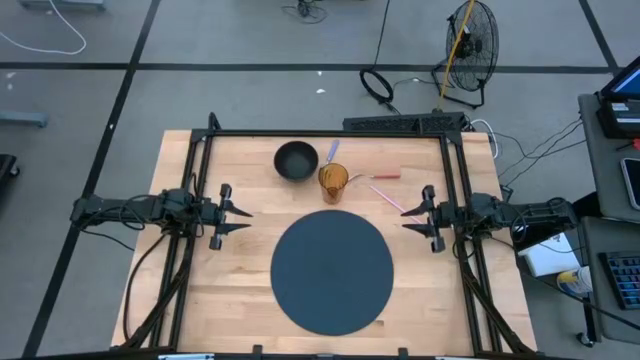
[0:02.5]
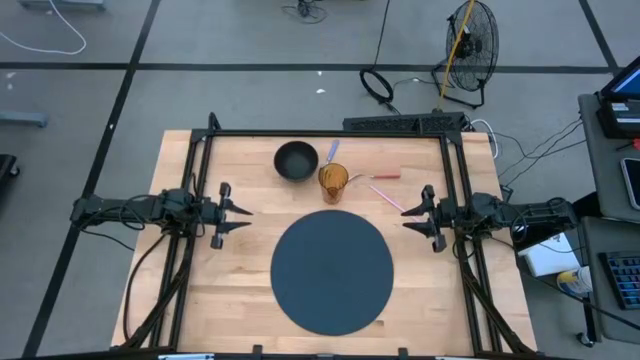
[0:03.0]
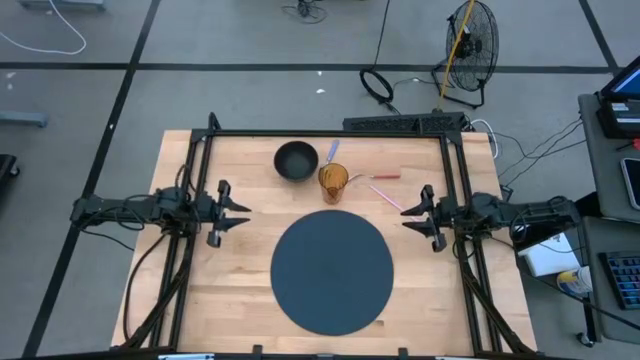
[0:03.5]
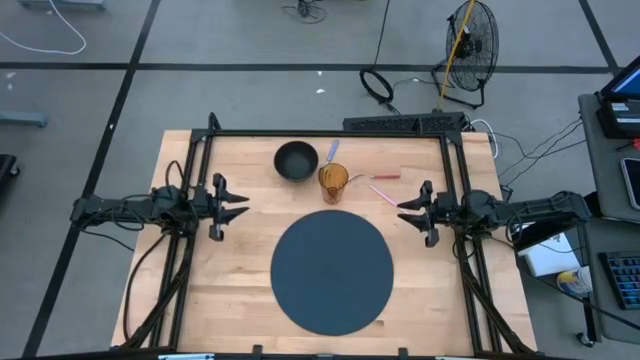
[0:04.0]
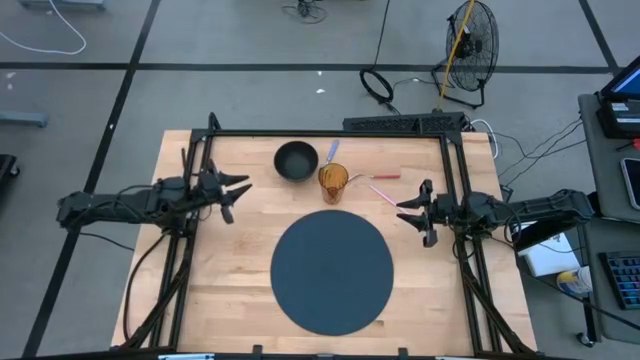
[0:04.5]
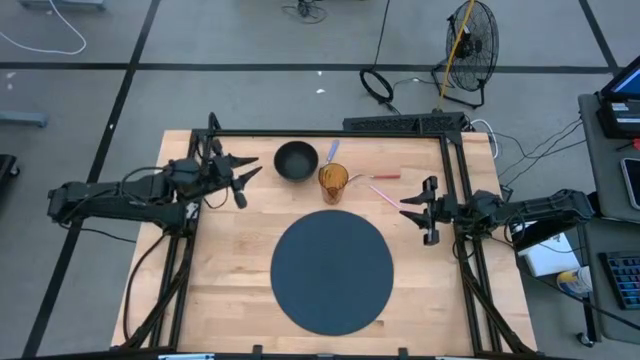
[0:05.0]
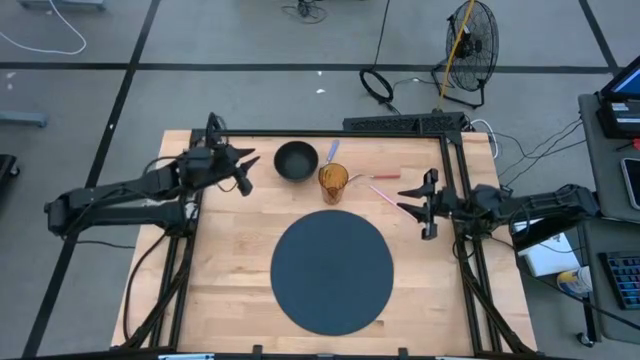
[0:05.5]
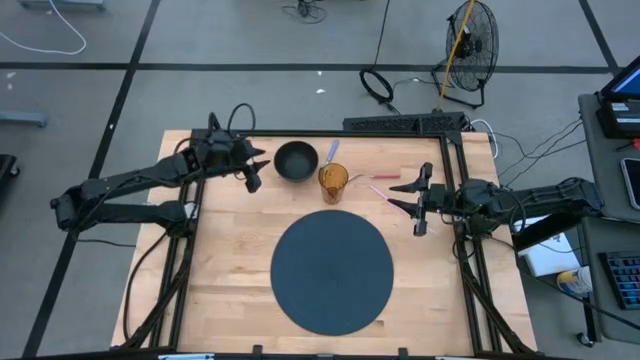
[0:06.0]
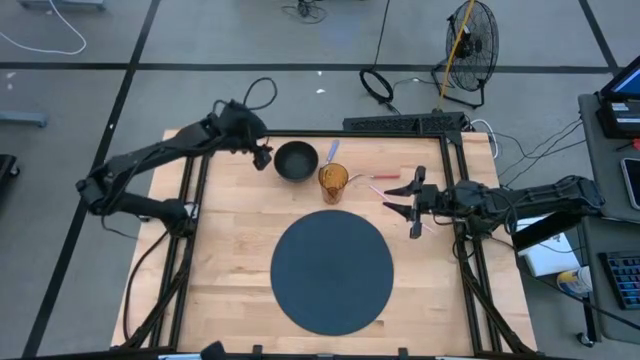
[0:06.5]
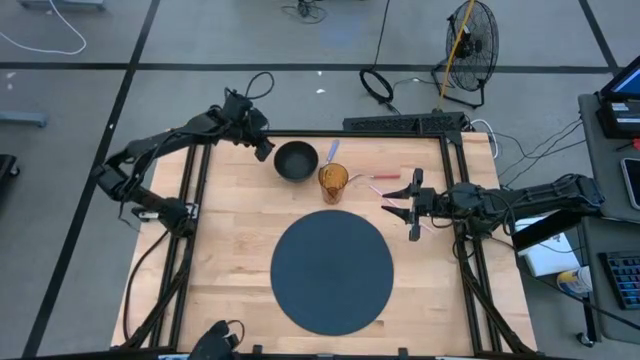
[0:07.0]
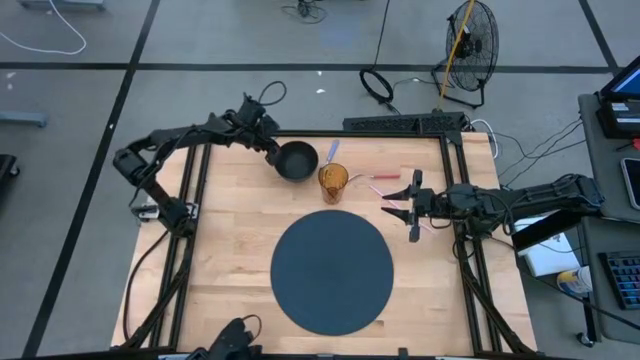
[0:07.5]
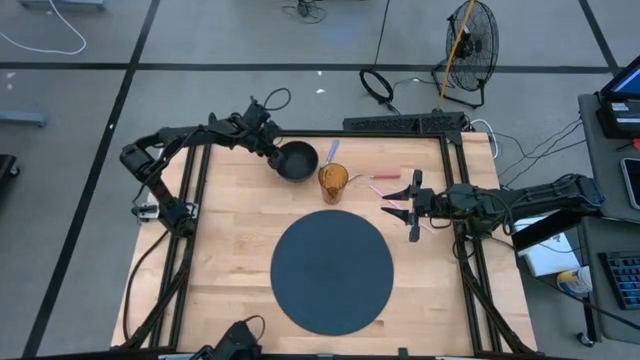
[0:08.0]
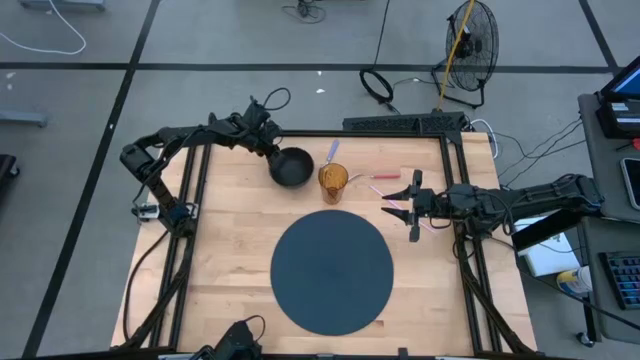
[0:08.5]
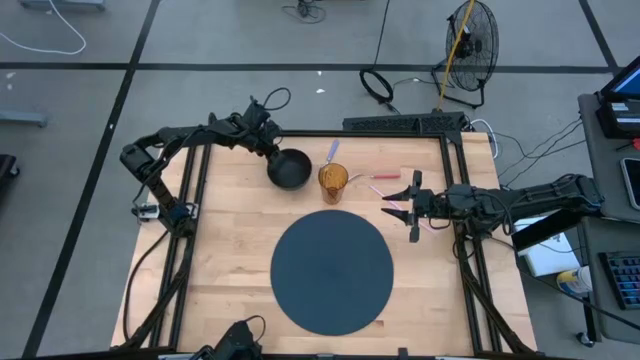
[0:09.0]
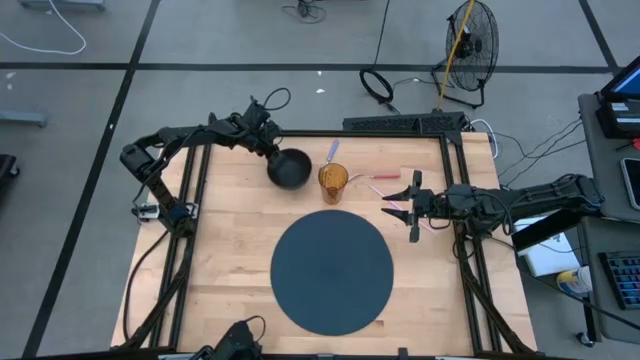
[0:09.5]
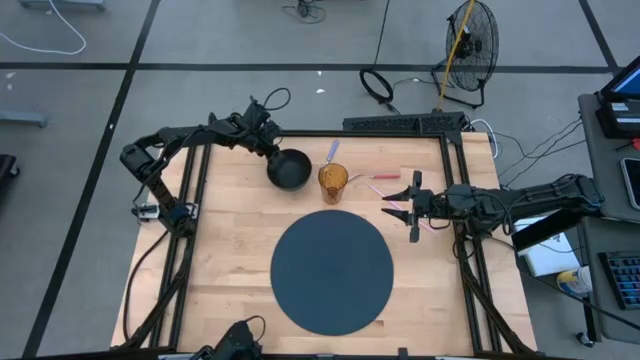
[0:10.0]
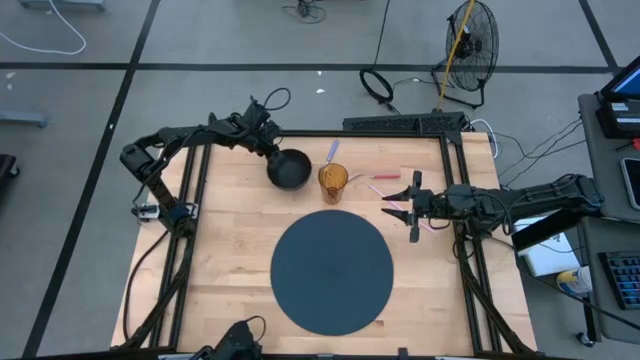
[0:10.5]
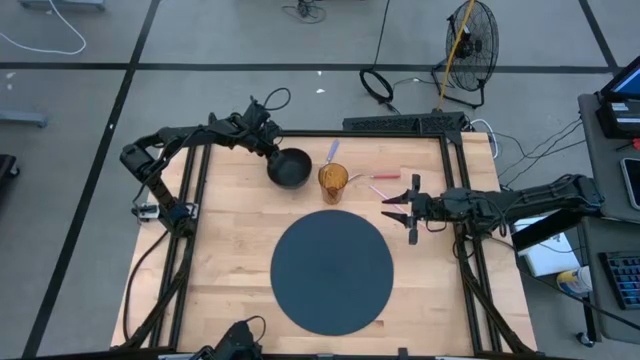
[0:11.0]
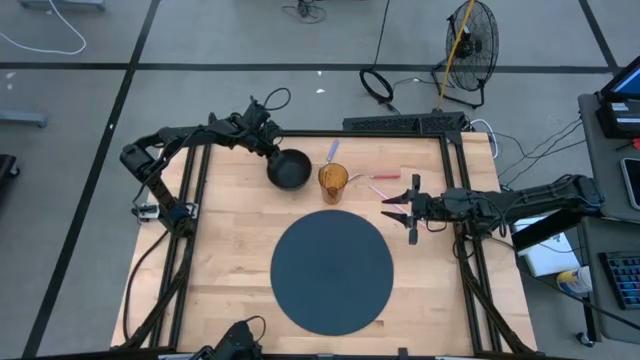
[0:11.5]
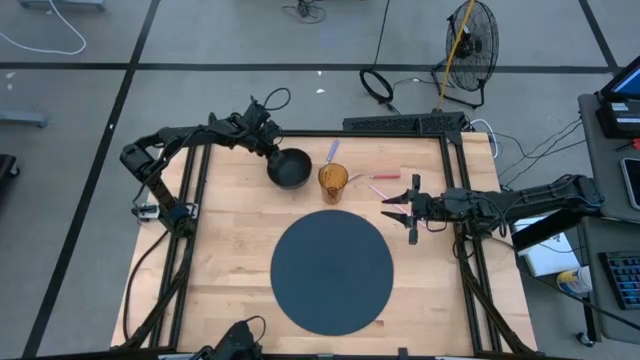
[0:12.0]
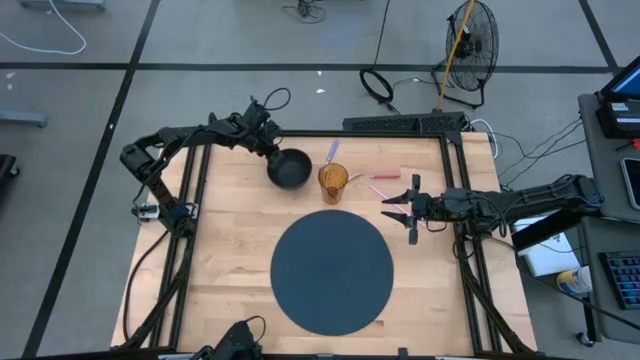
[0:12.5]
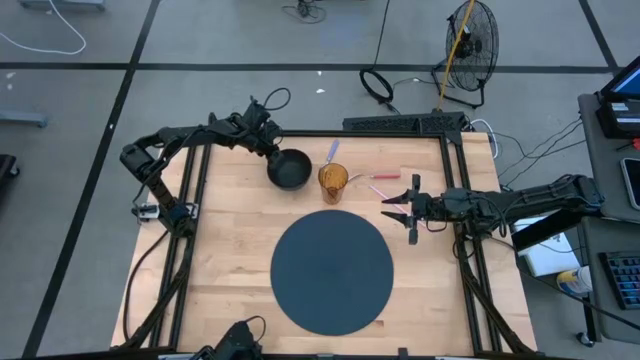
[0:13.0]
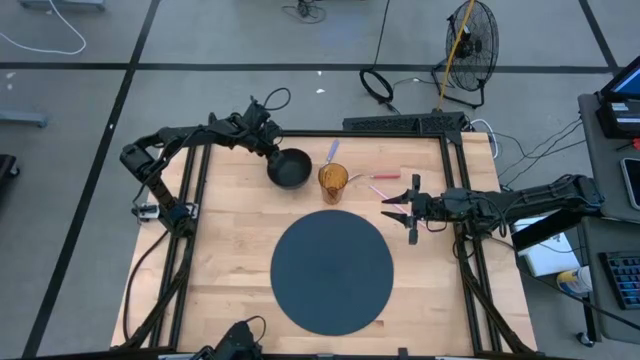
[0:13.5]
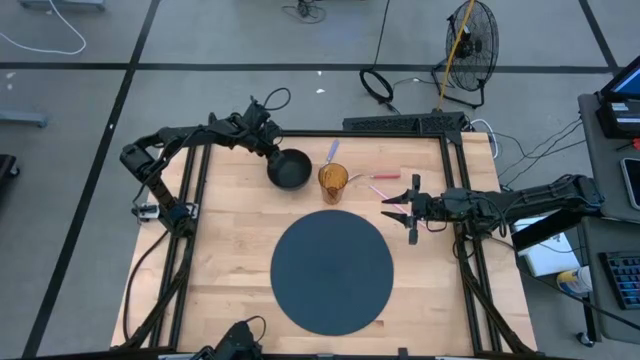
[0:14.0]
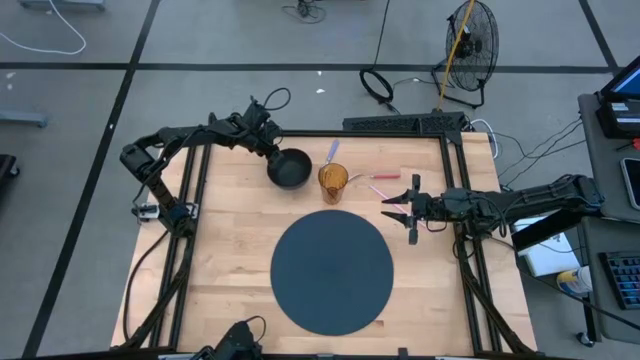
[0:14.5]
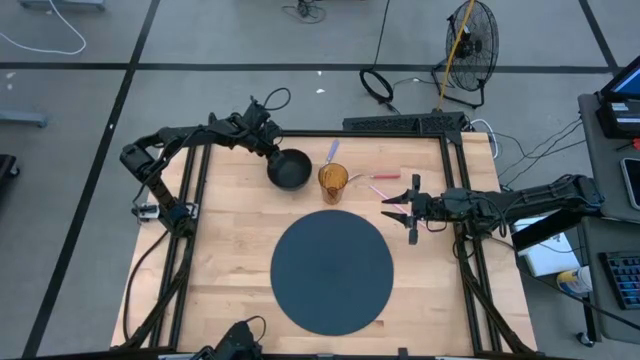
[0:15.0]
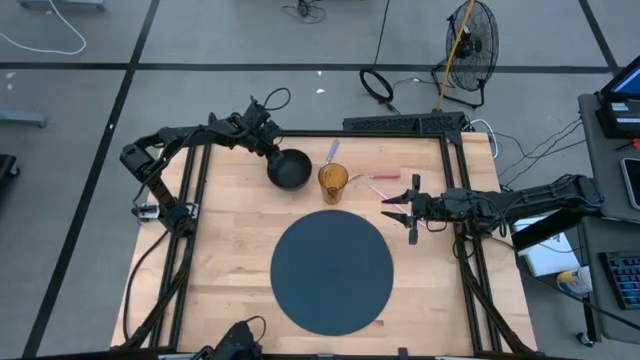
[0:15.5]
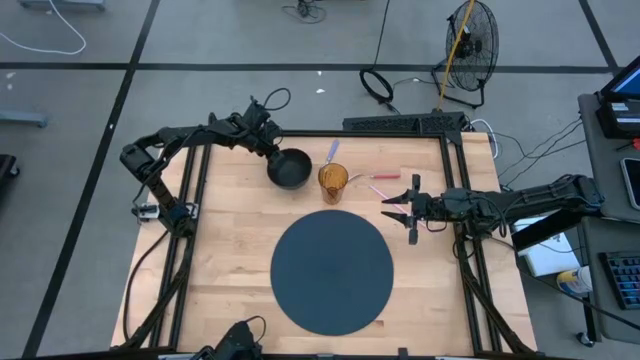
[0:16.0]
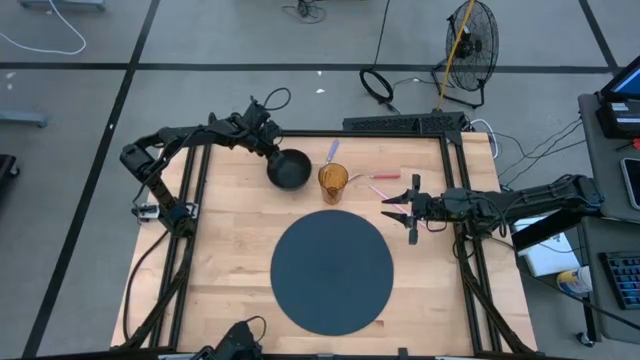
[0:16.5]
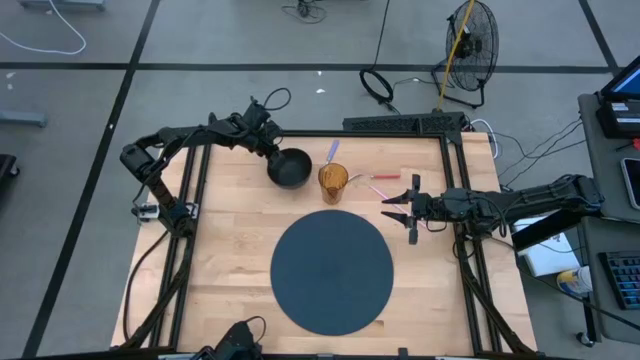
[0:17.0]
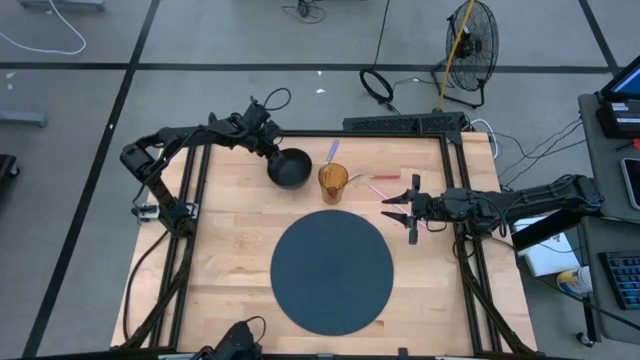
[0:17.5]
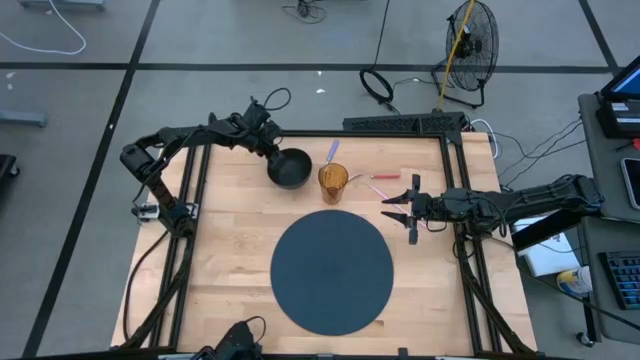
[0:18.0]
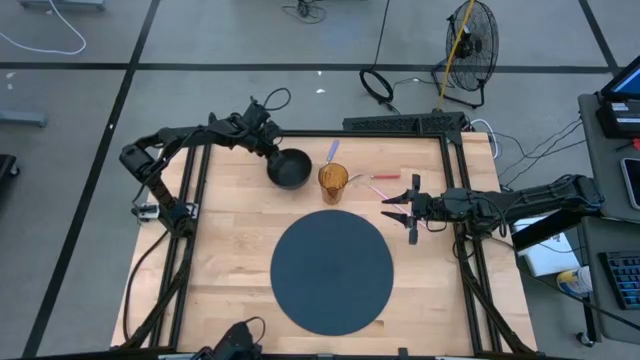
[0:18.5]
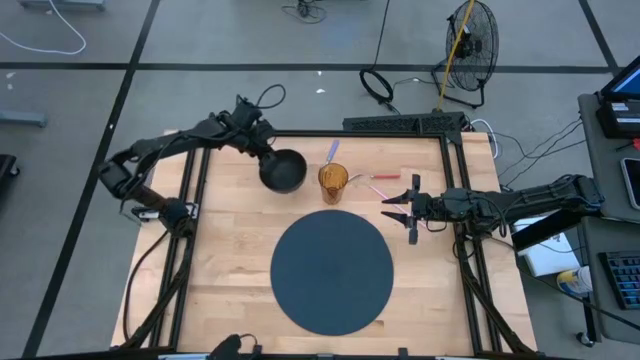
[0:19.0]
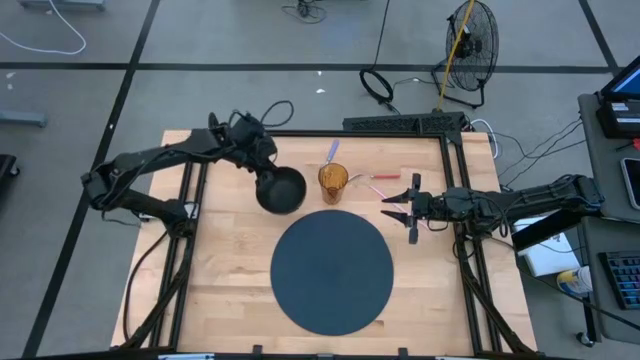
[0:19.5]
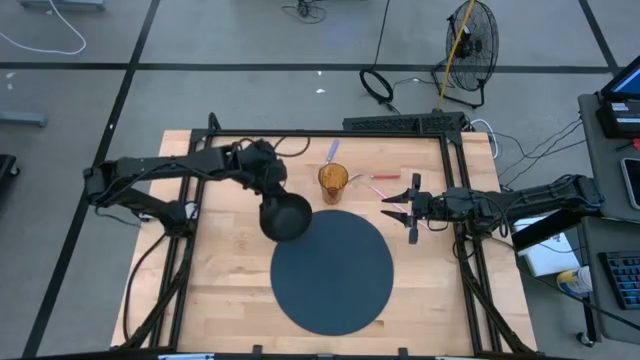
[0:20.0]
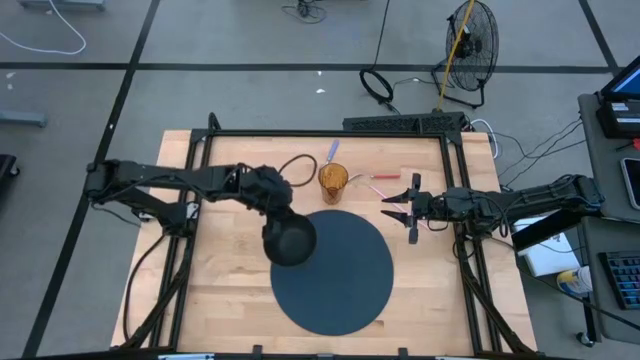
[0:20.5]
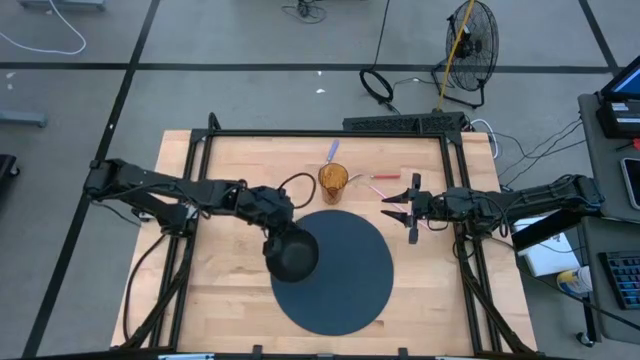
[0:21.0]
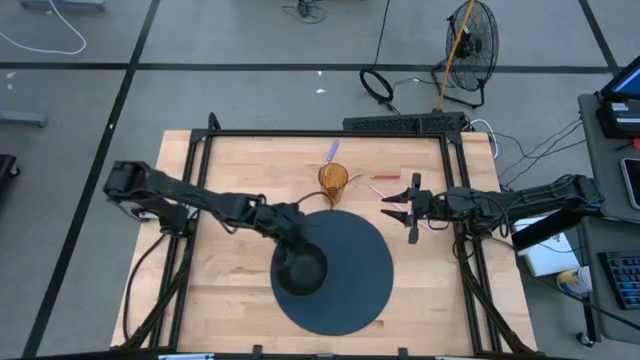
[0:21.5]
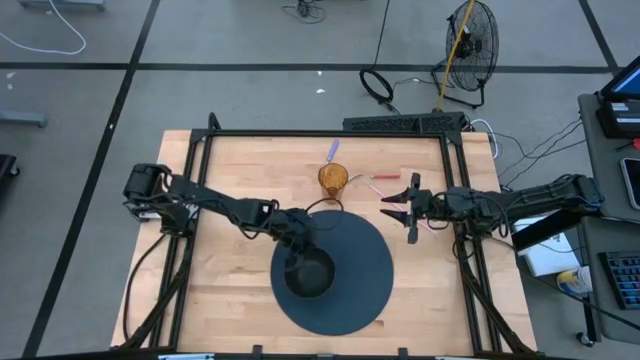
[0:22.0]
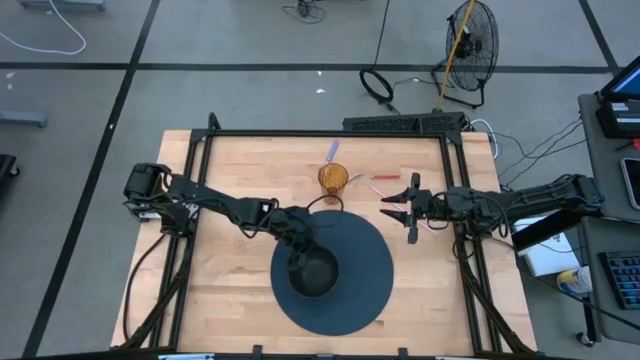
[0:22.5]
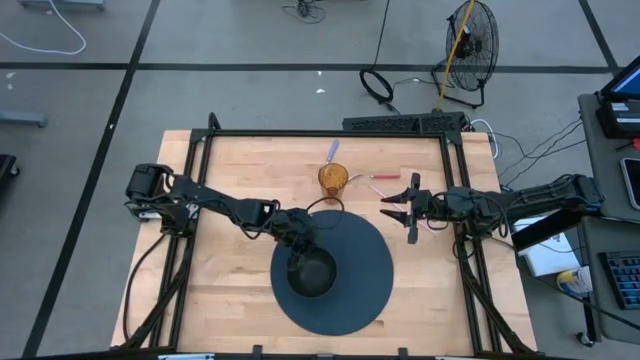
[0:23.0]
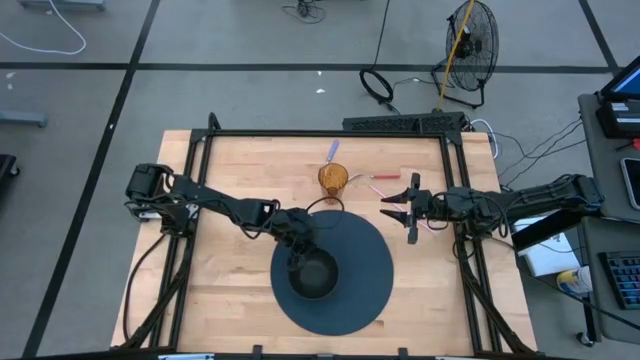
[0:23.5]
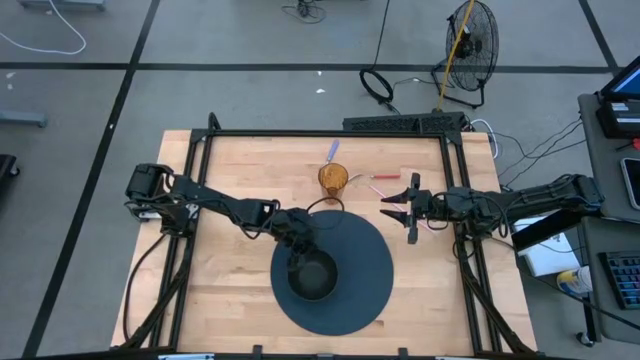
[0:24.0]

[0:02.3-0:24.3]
Task: Pick & Place Utensil
Put the black bowl on the left of the blue mat
